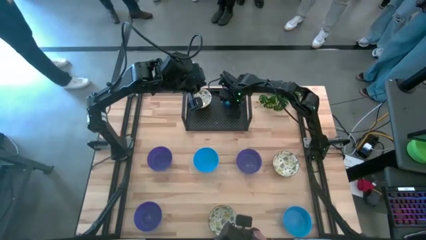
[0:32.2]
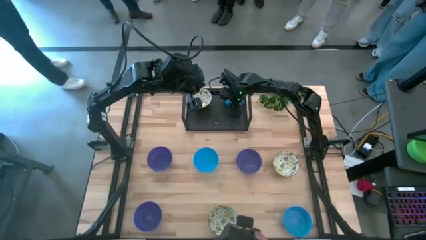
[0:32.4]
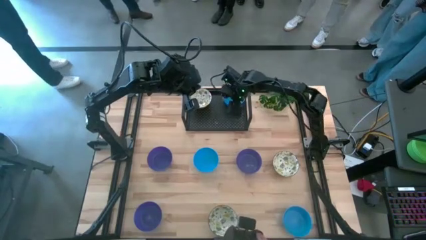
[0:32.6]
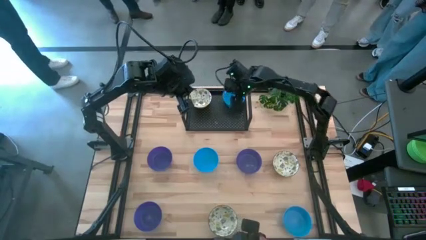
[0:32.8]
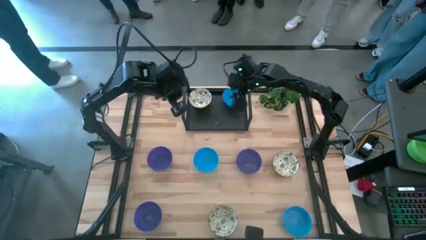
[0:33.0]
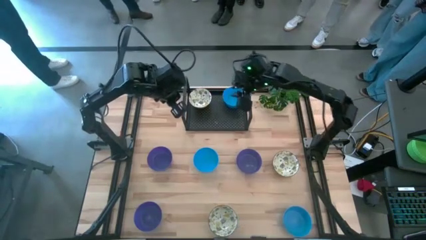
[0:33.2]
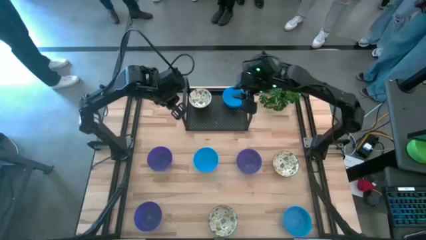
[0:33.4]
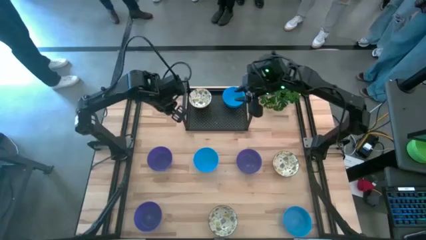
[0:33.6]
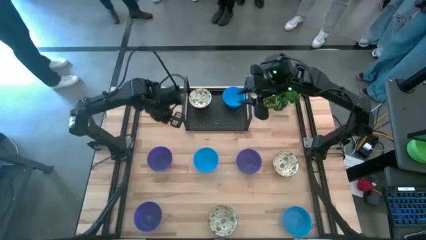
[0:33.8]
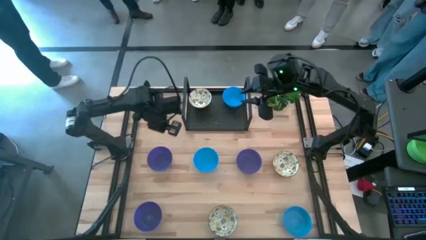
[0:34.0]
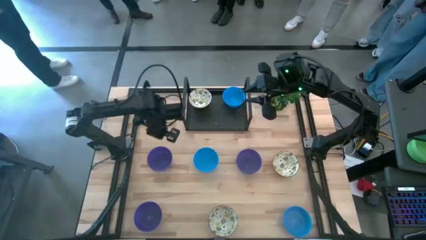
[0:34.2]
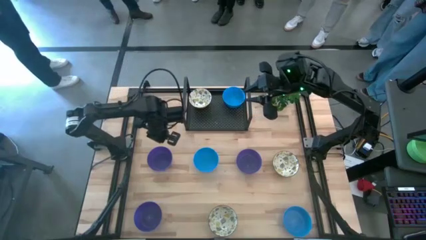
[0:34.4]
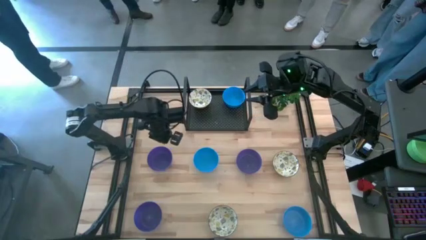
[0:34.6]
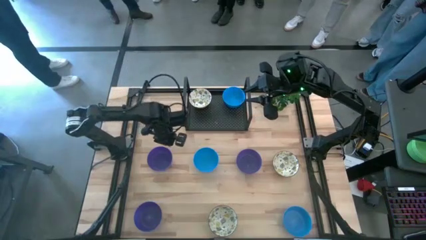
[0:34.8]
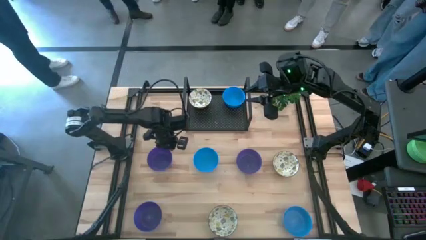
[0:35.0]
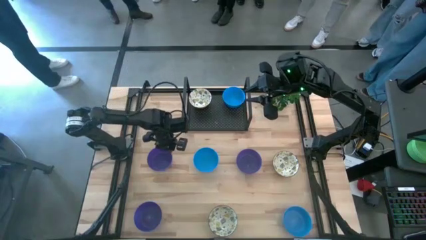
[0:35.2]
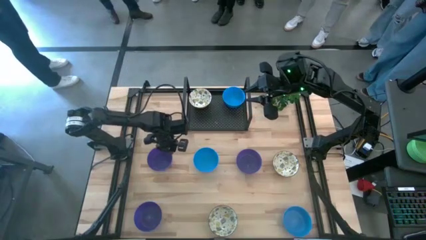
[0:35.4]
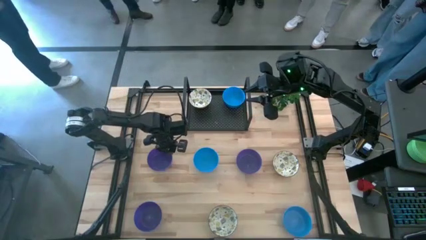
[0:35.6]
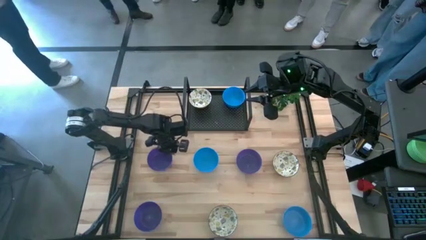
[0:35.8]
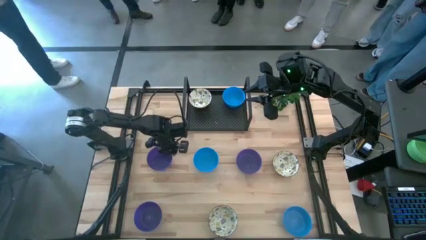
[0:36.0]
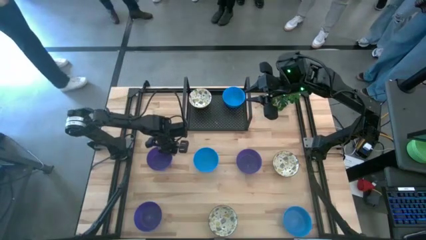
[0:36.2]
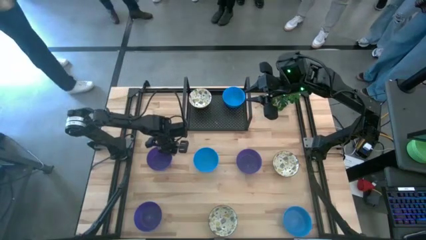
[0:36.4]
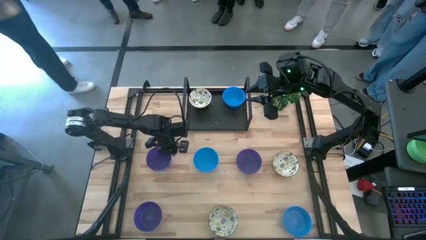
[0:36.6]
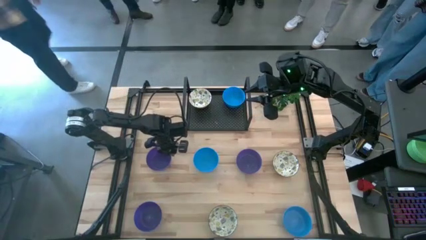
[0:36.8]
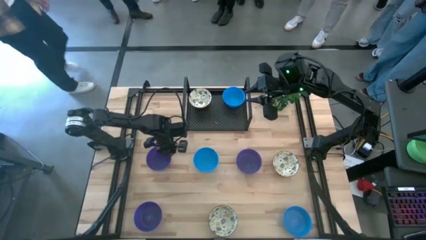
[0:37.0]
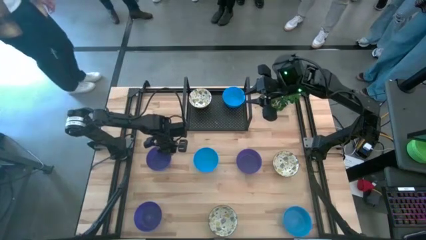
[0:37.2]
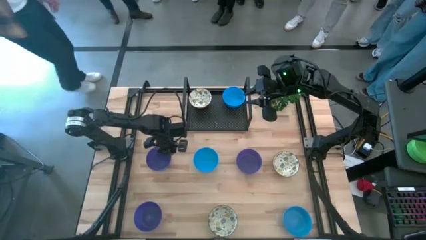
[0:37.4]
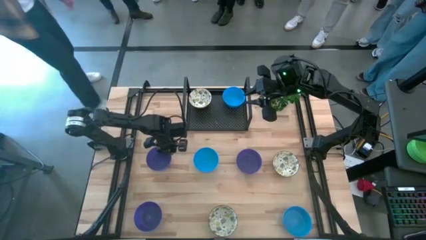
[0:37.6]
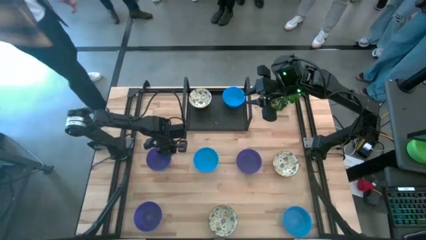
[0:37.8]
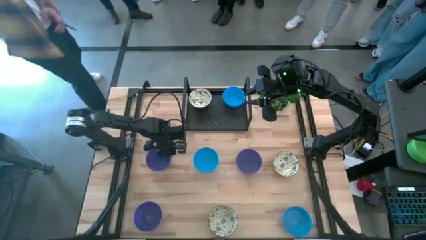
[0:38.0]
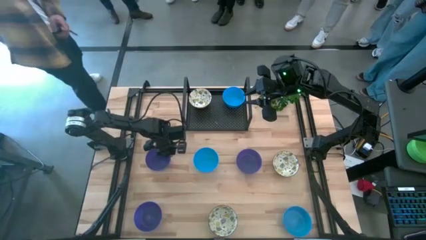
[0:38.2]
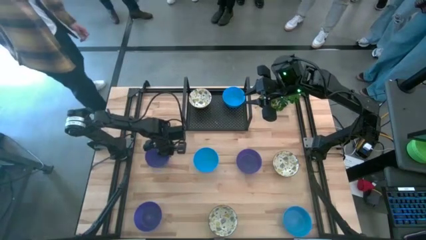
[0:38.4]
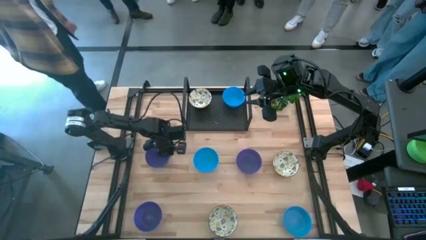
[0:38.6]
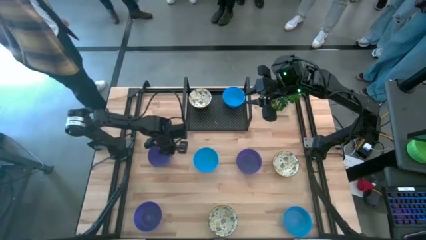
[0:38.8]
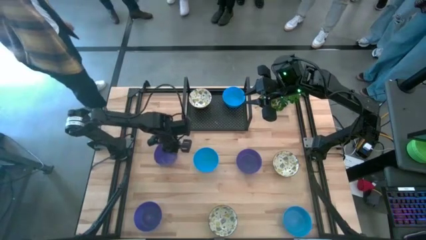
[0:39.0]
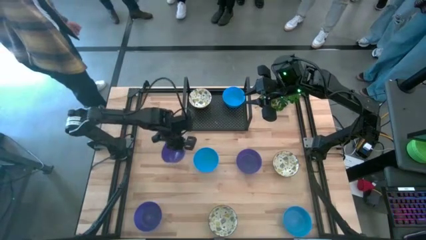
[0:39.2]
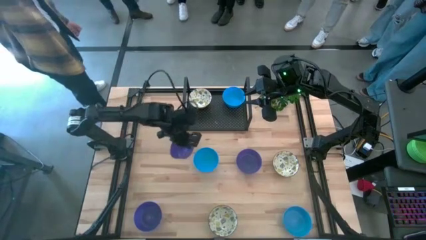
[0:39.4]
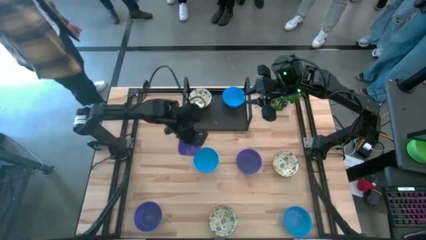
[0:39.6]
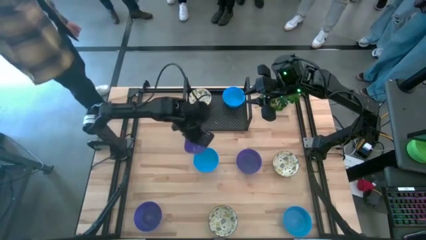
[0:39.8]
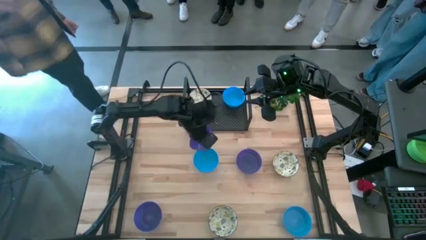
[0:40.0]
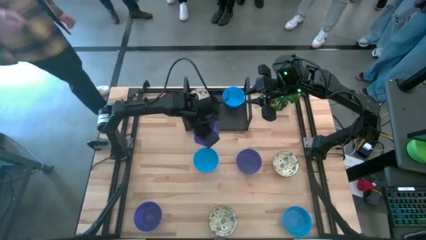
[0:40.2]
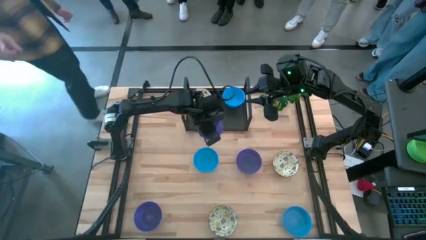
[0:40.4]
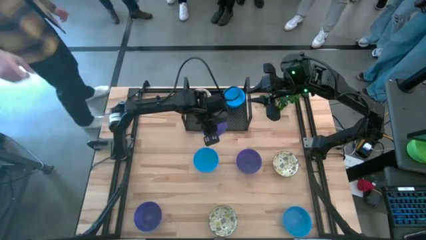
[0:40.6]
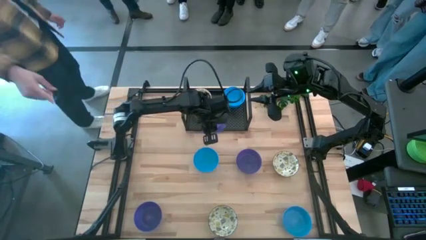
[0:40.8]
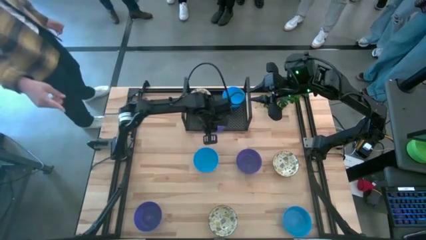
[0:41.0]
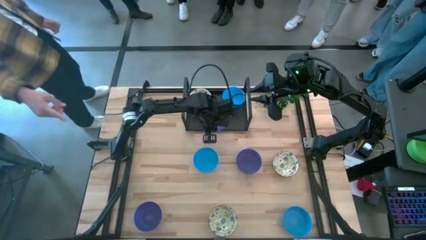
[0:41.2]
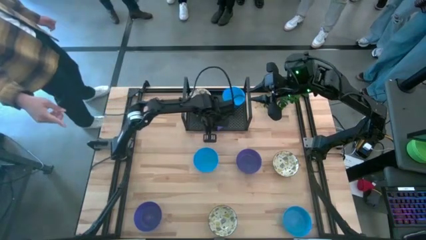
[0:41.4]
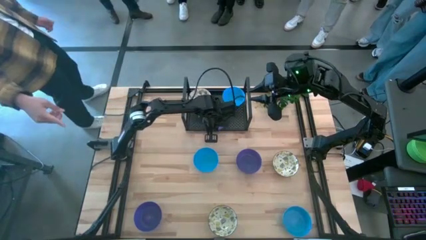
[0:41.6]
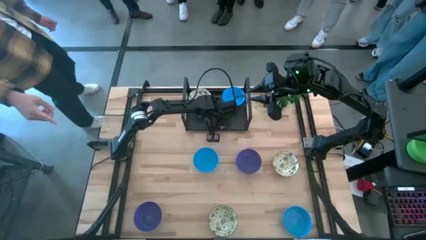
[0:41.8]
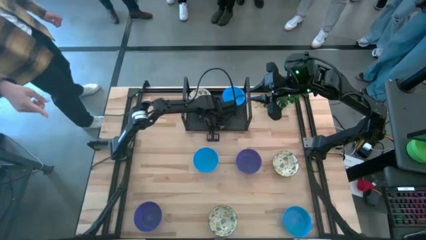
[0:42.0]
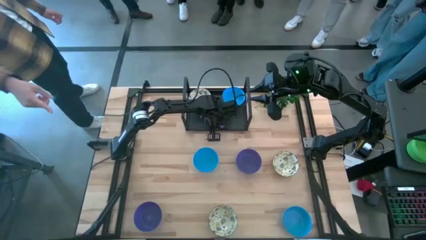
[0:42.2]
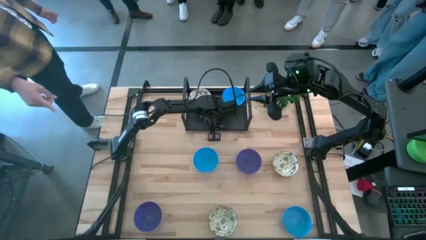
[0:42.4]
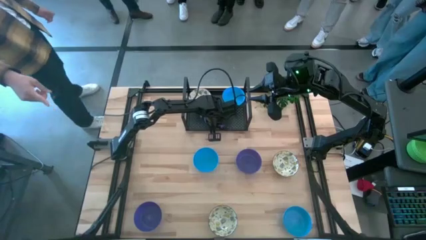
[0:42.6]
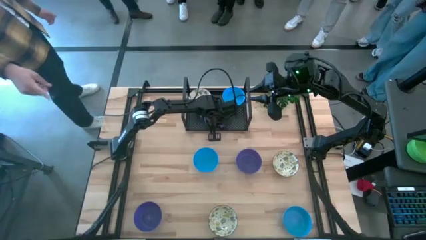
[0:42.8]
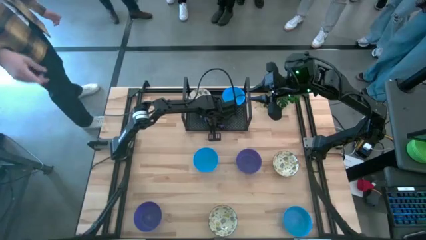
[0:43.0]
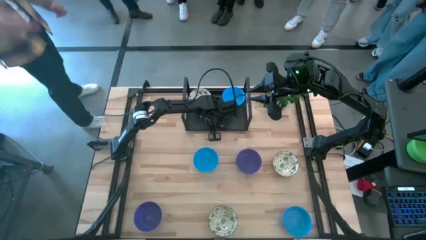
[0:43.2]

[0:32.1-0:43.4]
Task: Pick & Place Mini bowls
Put the top left purple bowl on the shelf

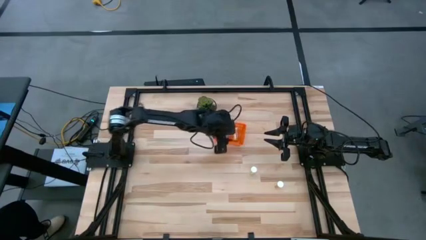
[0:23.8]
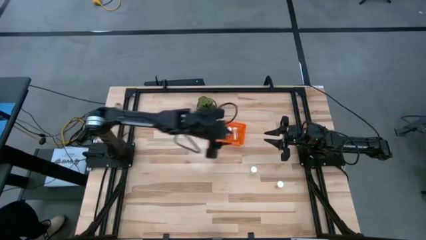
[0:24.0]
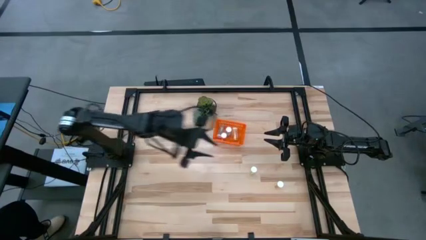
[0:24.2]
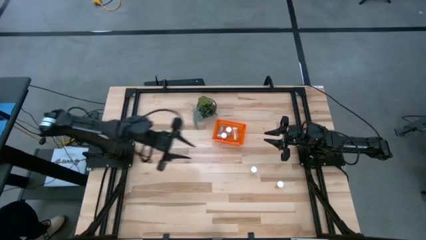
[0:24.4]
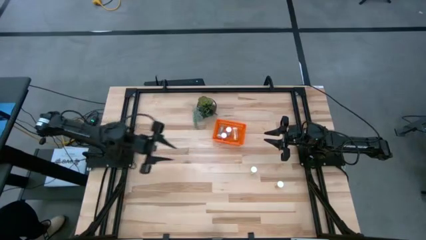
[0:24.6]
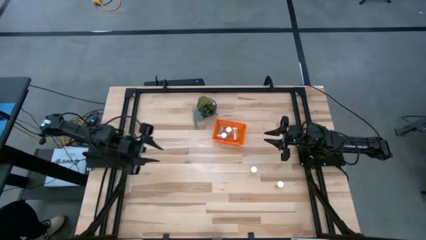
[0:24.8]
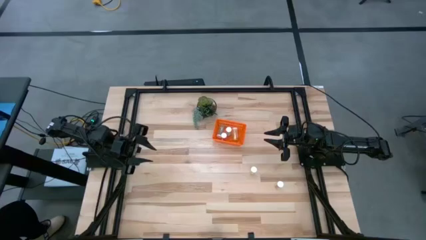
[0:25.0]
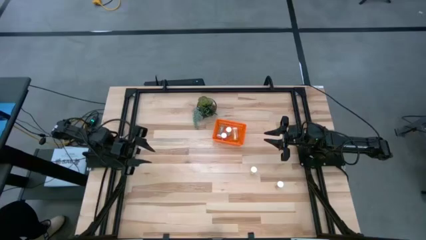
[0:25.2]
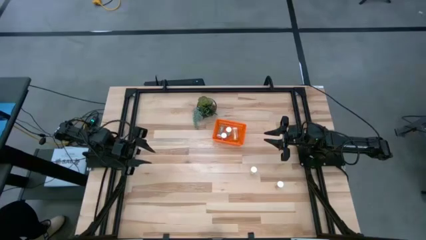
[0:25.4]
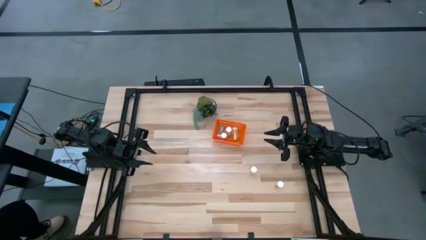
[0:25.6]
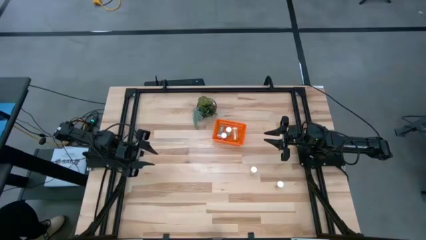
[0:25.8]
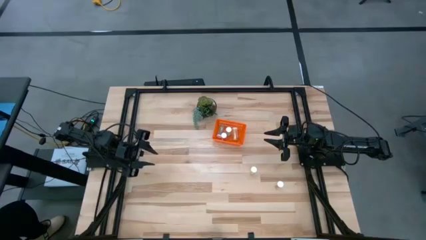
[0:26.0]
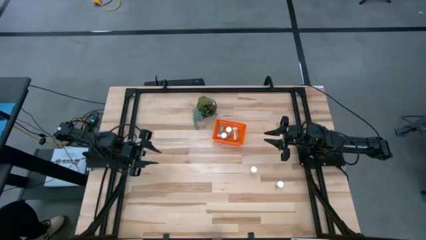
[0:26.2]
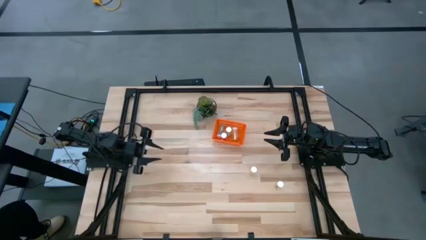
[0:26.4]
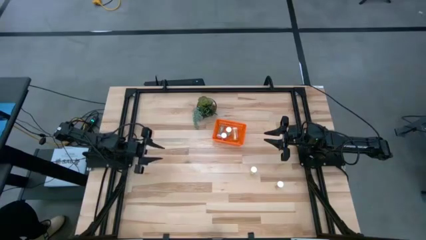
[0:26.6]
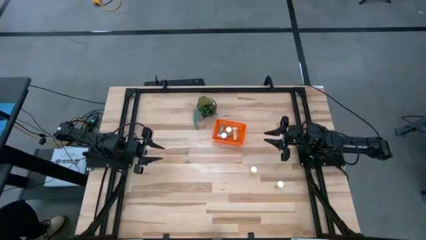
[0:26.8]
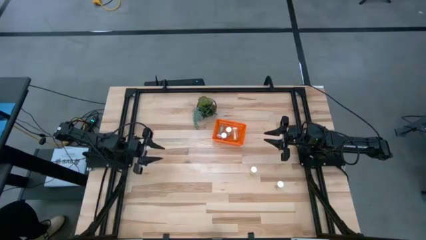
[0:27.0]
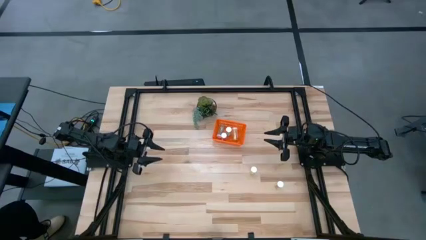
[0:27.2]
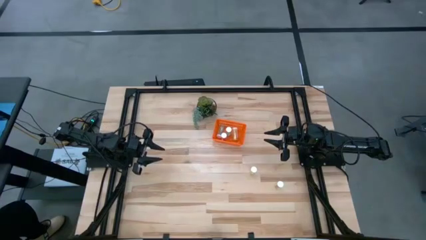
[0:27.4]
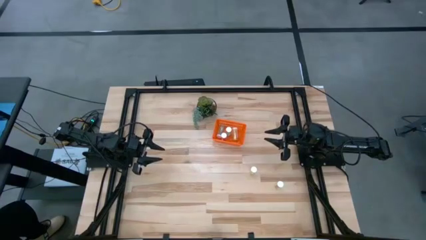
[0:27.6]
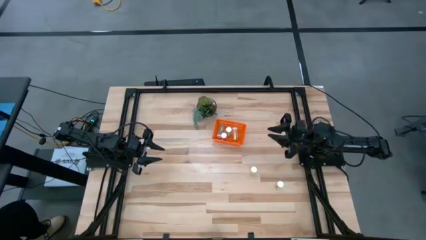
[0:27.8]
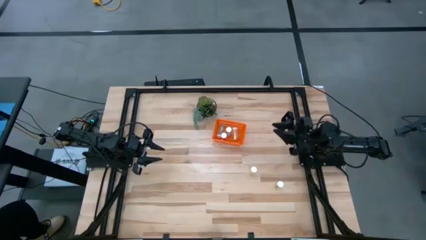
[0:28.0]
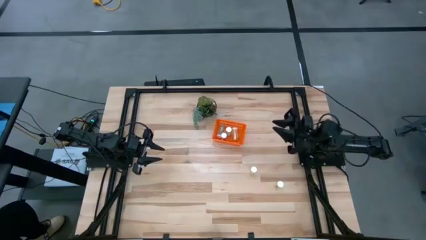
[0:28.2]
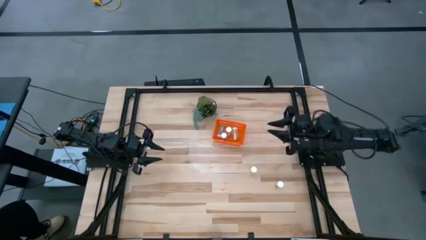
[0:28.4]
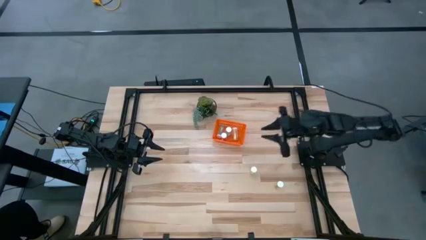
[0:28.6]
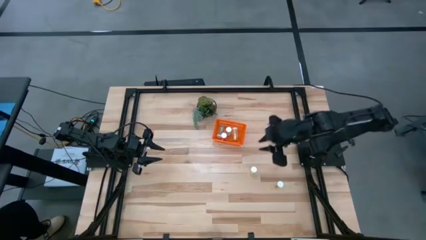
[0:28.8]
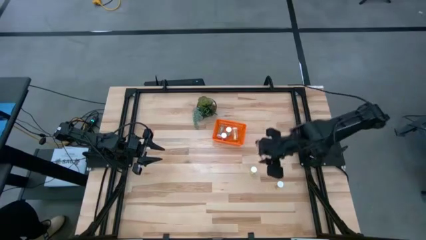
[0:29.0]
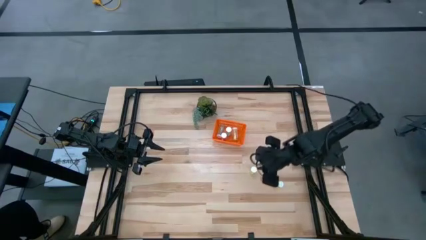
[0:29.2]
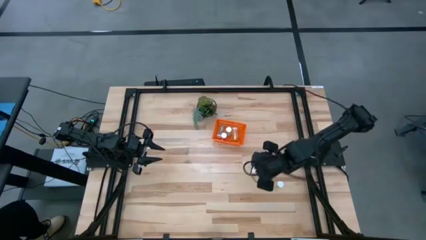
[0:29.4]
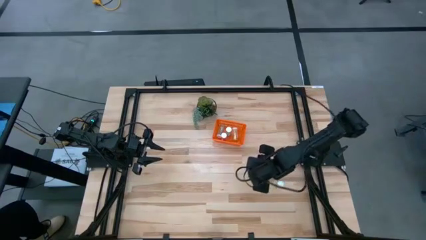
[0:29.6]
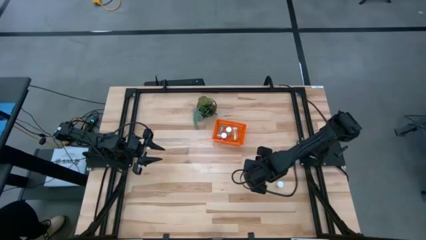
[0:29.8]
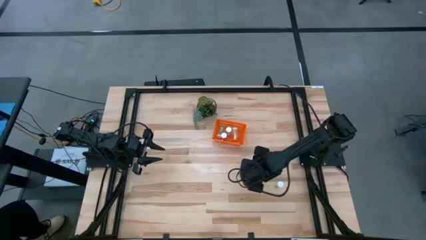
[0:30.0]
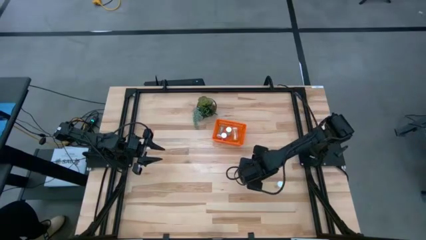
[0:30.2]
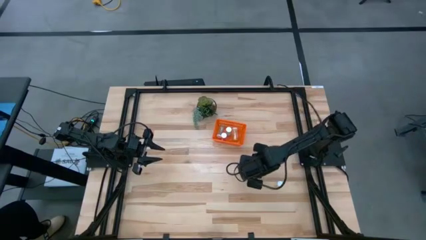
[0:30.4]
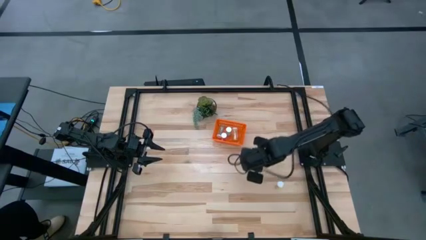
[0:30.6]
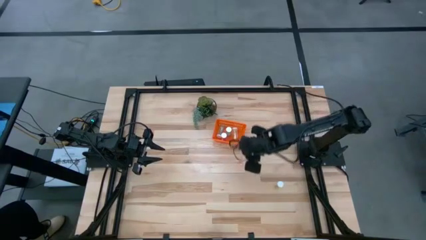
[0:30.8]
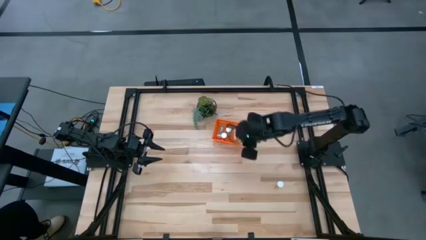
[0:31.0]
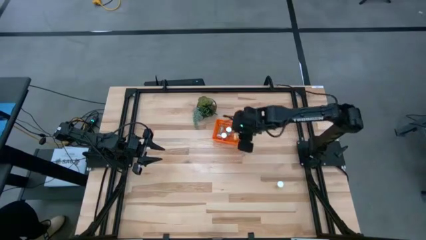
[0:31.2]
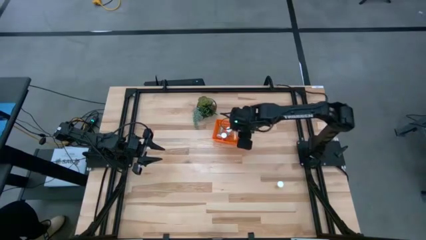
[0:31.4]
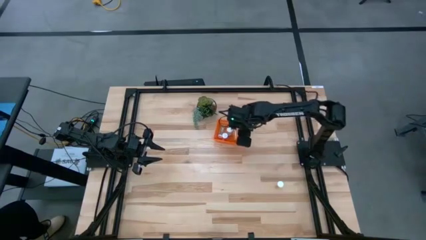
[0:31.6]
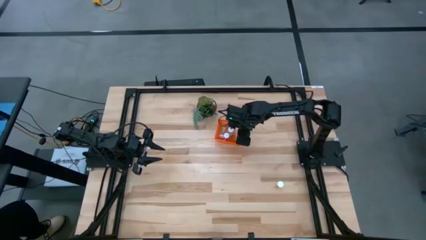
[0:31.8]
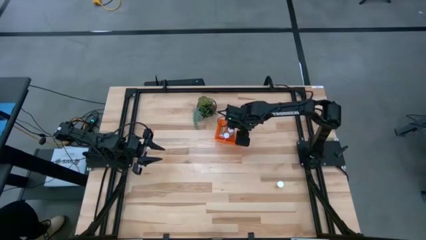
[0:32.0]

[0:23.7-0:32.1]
Task: Pick and place pill bottles into a basket
Put the yellow pill bottle into the orange basket
